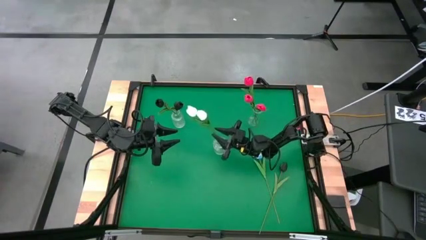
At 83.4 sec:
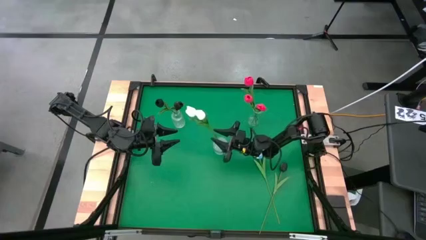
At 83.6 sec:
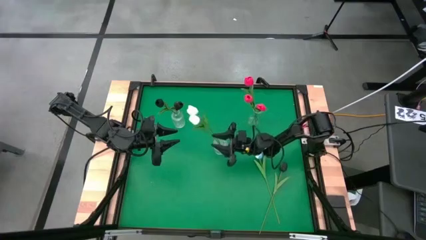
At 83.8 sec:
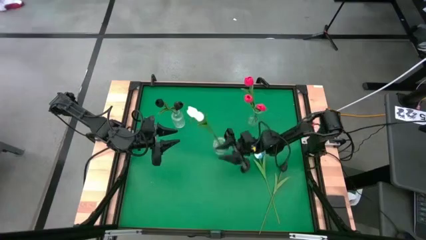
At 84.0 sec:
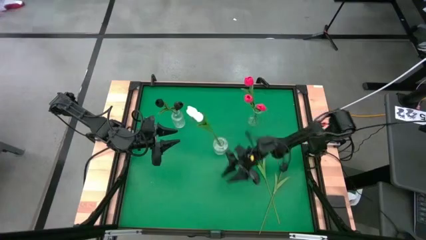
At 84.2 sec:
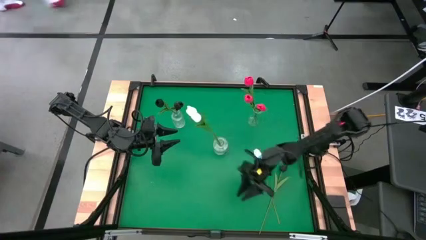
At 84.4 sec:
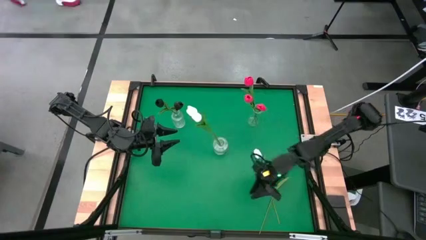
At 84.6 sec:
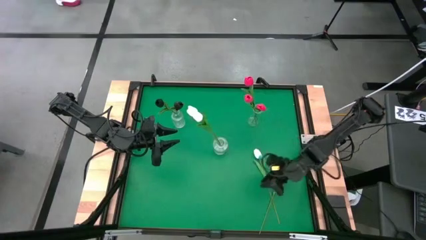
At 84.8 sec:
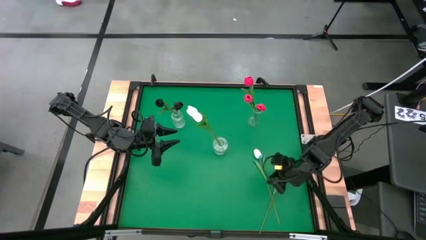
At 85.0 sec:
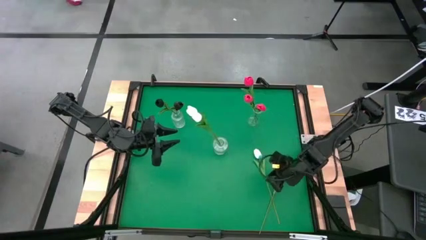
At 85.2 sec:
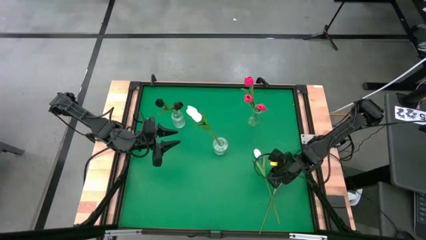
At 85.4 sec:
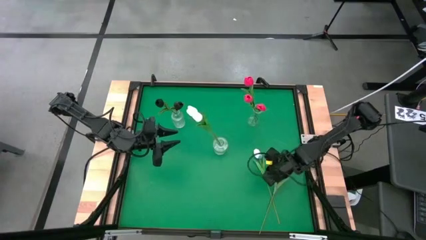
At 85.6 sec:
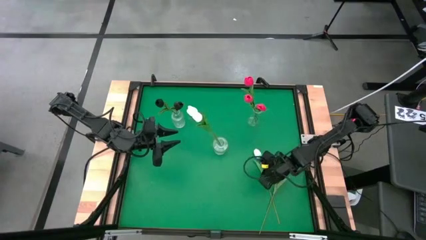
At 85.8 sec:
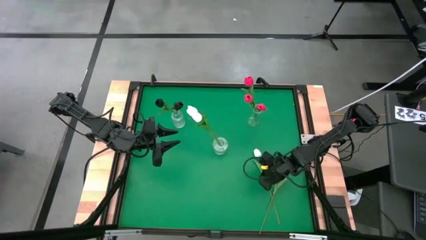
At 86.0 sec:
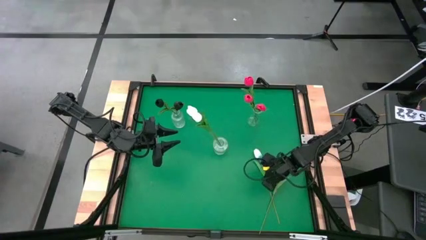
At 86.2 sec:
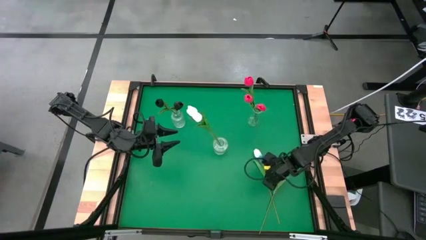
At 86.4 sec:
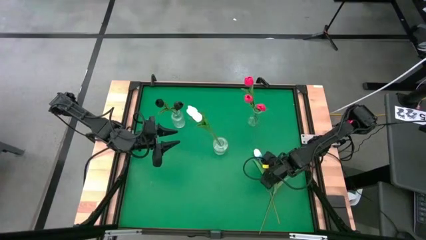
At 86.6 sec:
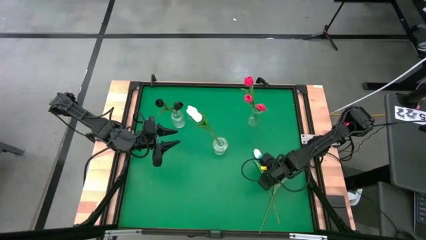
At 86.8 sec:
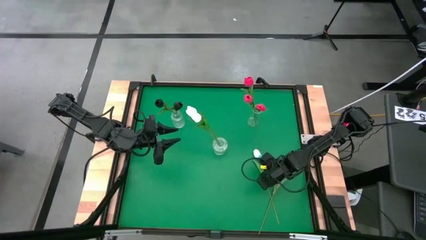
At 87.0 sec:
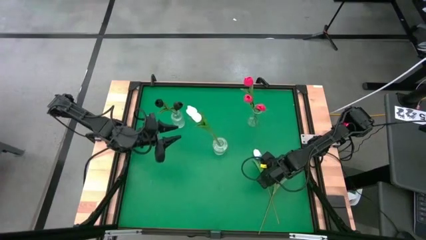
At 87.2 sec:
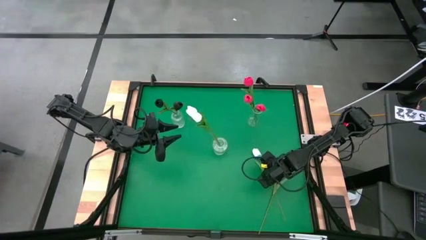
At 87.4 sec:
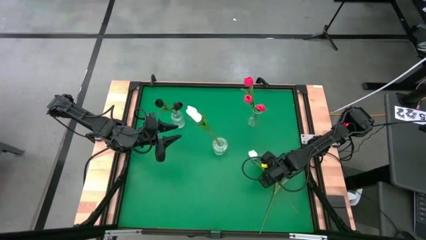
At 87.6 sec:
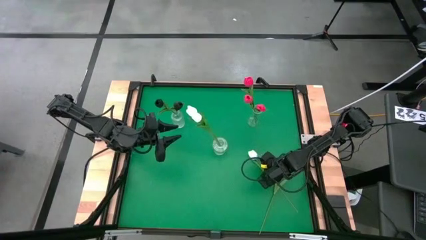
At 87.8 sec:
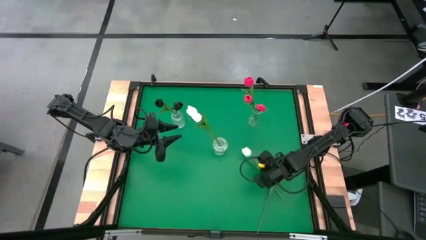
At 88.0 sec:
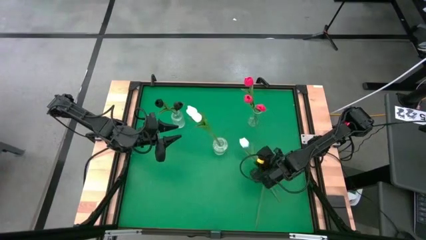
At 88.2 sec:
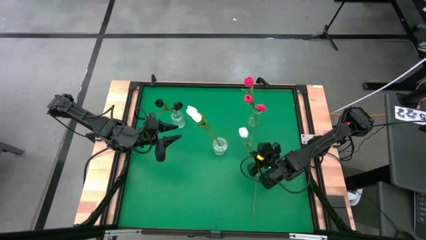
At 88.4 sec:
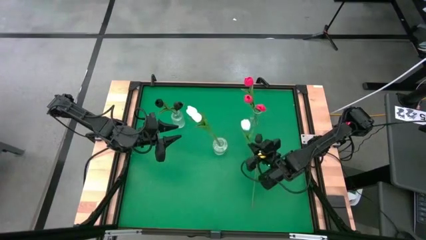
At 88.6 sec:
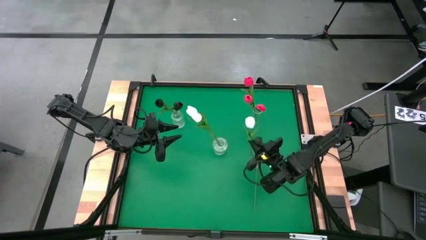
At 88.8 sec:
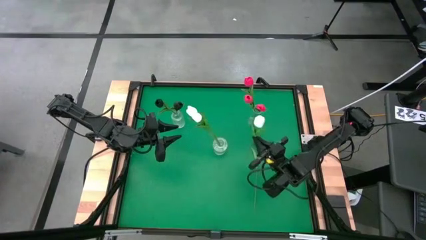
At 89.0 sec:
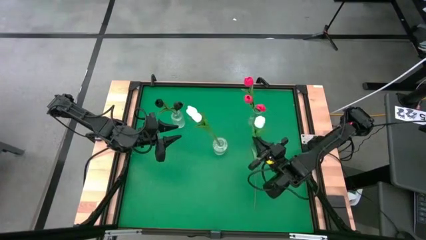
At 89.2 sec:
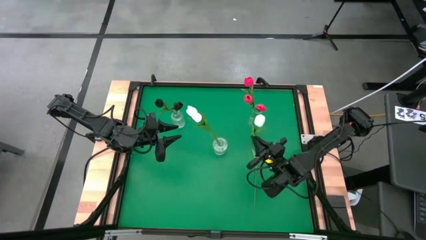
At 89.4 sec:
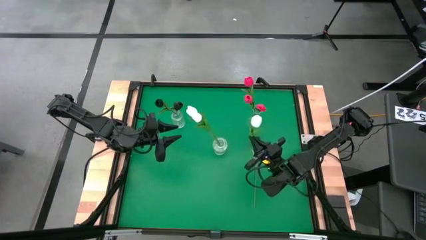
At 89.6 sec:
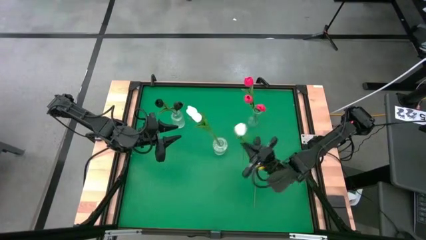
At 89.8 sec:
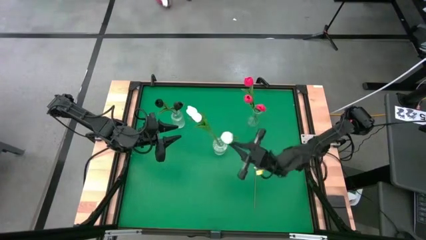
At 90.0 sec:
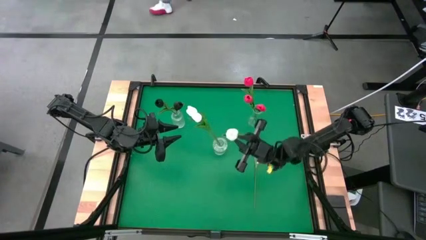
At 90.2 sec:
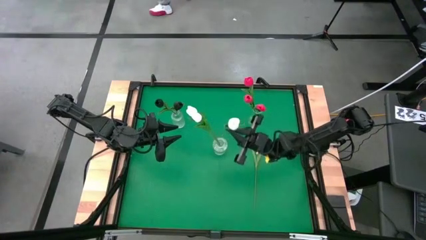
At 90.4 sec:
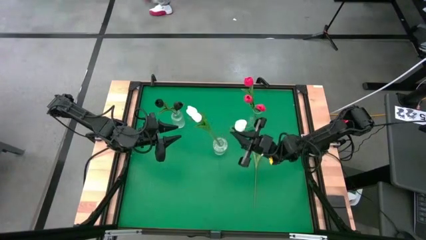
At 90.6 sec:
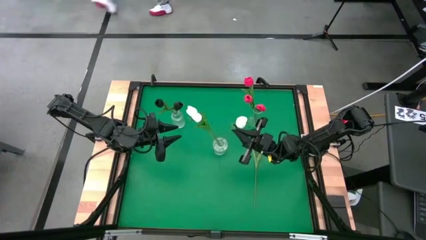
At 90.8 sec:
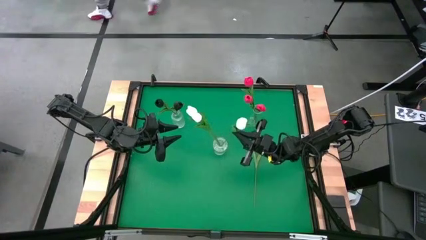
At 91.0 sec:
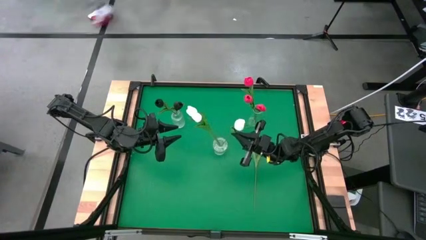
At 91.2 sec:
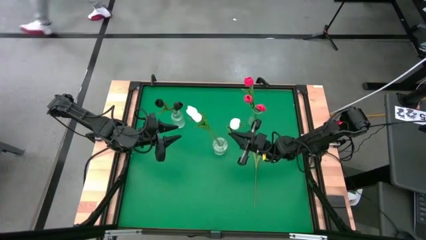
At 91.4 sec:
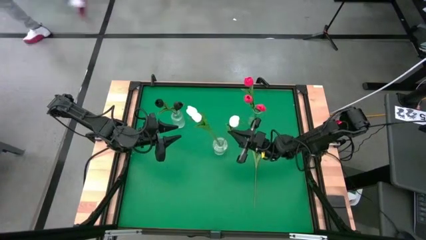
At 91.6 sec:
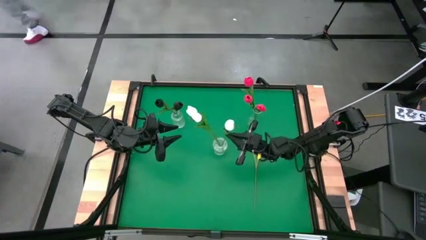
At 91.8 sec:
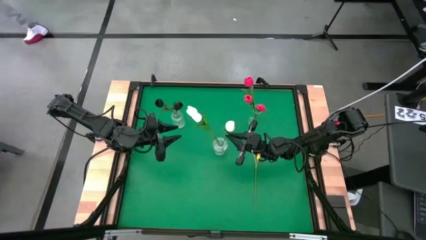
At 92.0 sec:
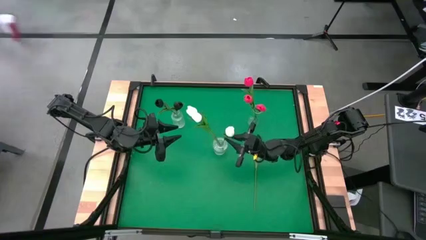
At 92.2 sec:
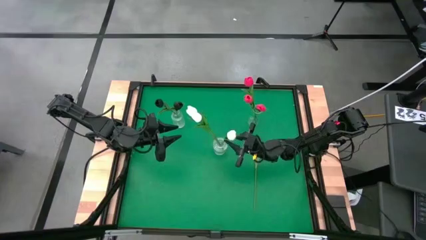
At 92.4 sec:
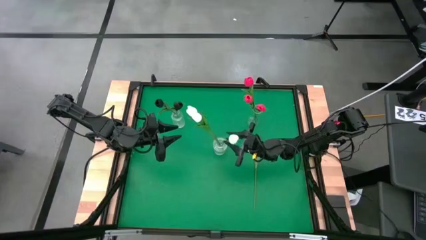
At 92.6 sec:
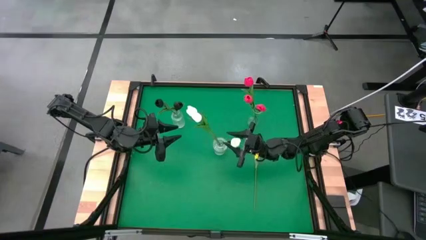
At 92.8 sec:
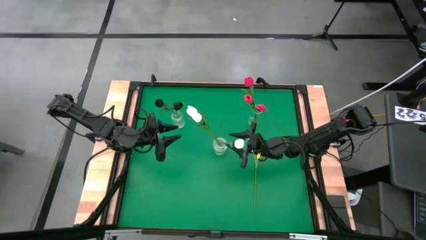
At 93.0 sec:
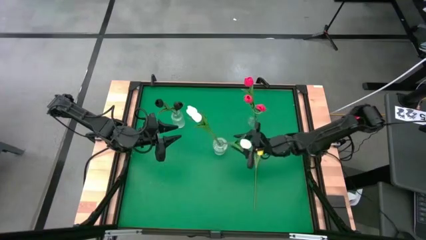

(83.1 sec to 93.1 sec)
Task: Sort flowers into vase by color
Put the white tulip into the middle transparent vase
